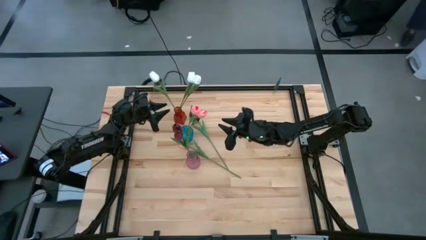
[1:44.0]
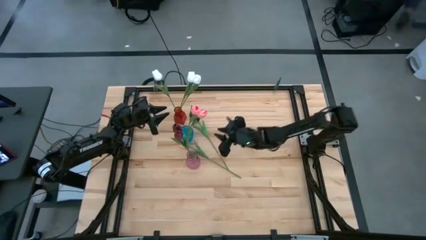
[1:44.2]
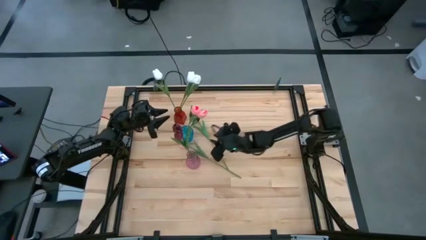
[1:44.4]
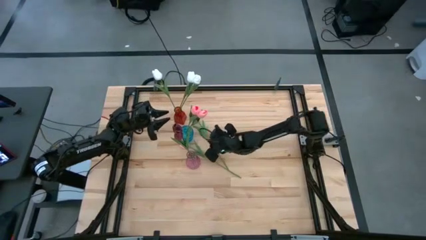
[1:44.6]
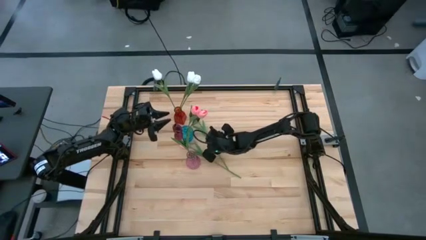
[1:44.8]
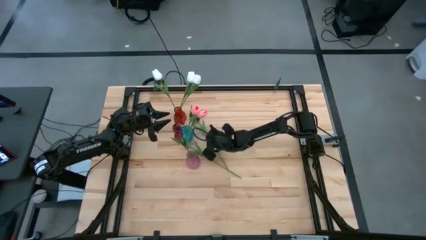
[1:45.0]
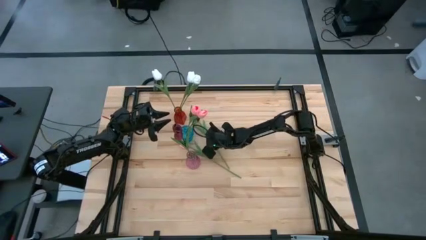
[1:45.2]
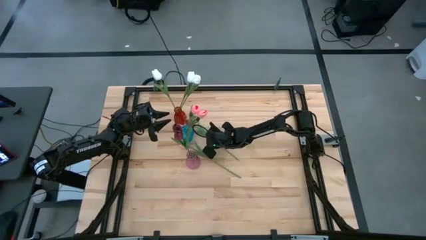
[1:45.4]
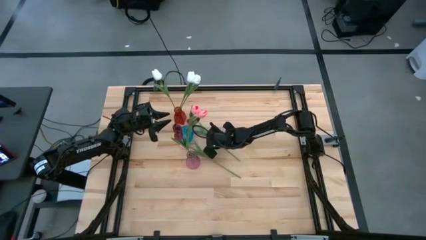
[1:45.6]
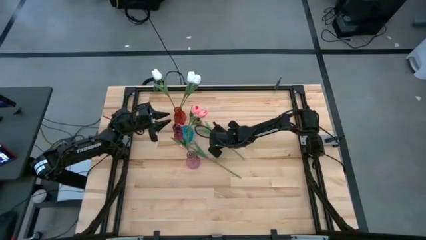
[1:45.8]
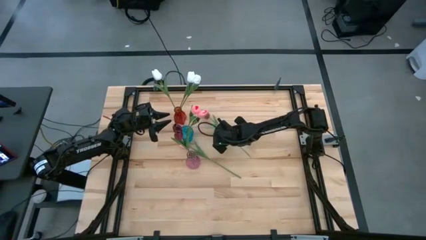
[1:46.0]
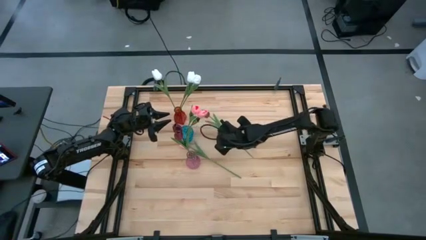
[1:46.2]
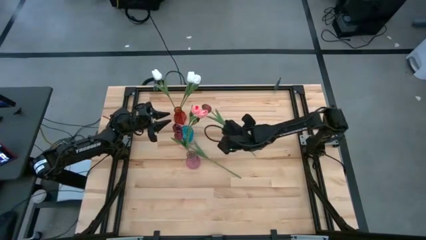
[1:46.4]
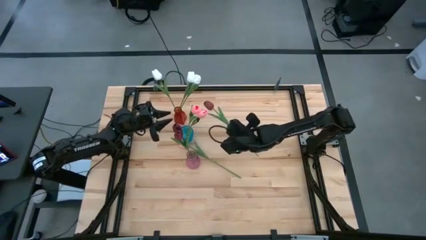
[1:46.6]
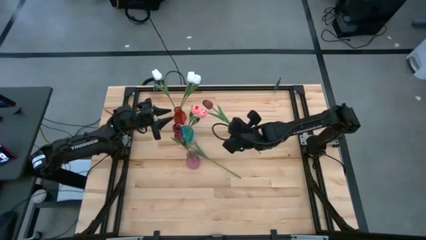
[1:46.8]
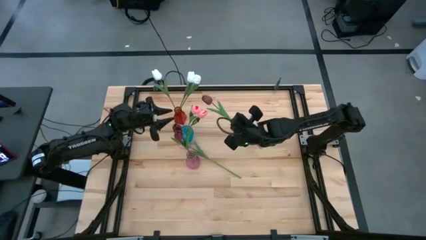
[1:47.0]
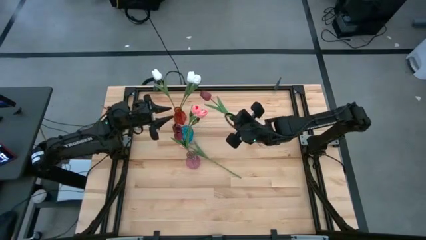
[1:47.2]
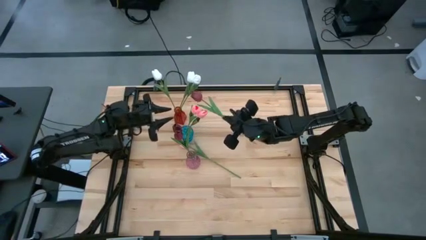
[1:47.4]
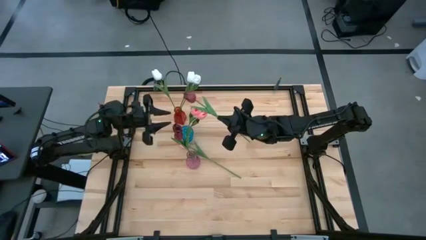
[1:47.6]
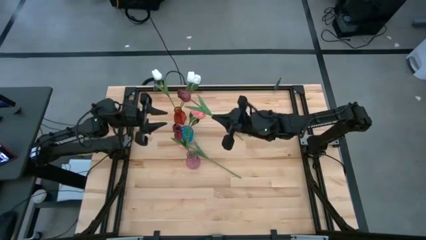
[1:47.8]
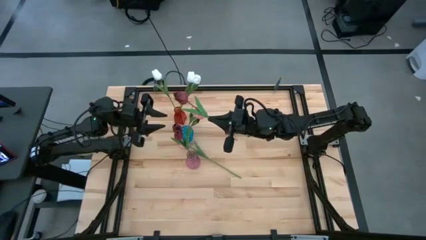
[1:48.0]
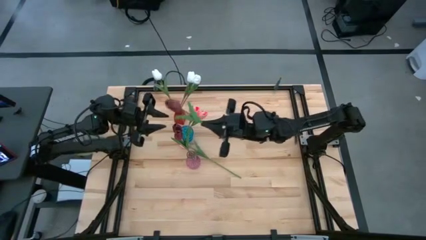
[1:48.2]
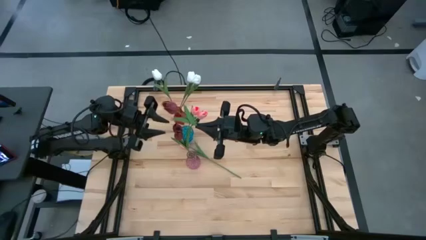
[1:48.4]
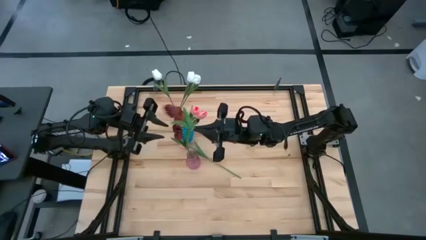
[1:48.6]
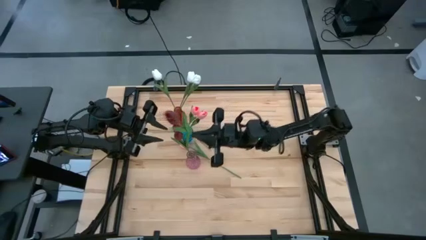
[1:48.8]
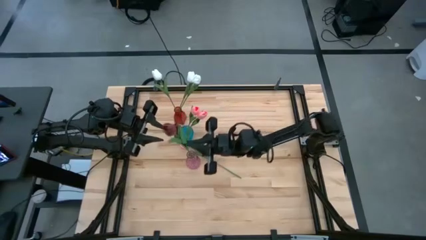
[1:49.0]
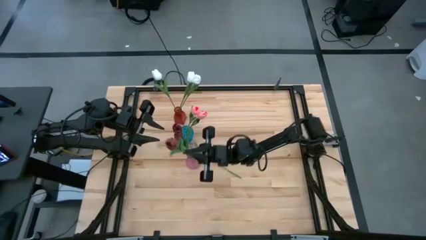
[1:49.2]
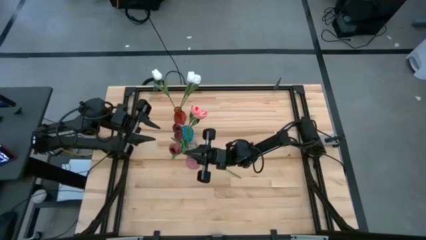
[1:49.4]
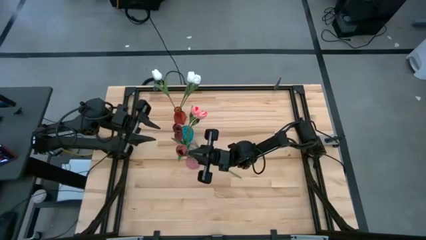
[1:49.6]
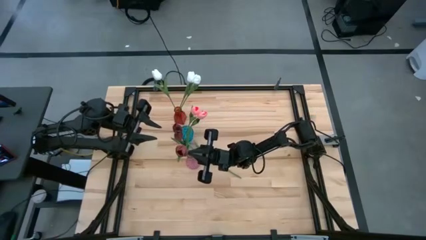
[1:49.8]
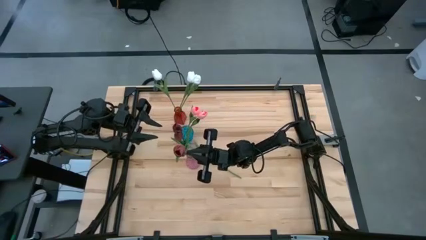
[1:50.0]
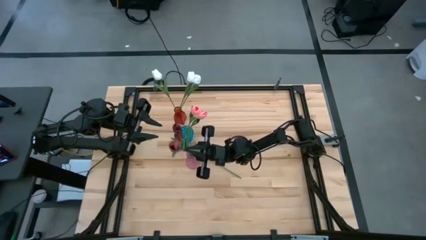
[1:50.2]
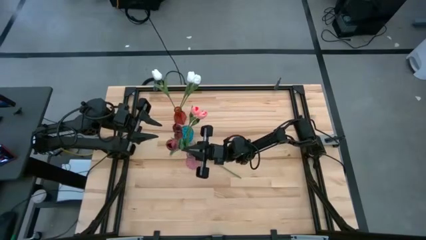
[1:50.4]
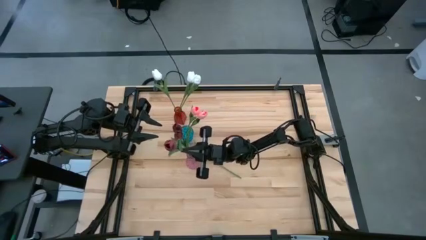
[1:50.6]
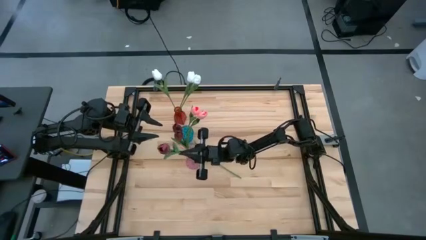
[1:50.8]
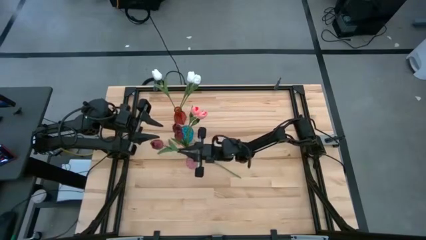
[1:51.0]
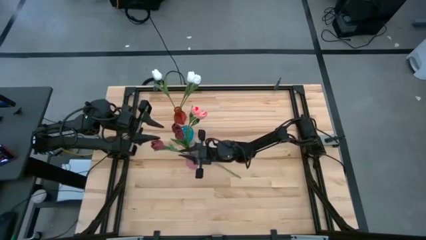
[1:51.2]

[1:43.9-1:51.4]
Task: Sort flowers into vase by color
Put the red flower into the purple vase

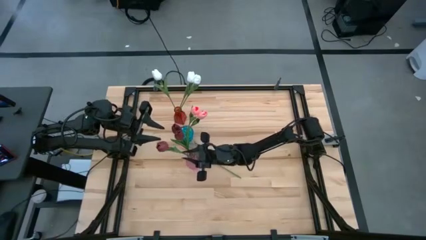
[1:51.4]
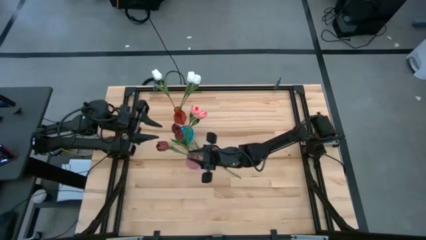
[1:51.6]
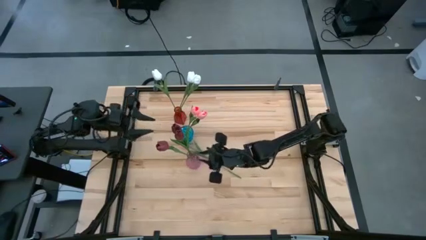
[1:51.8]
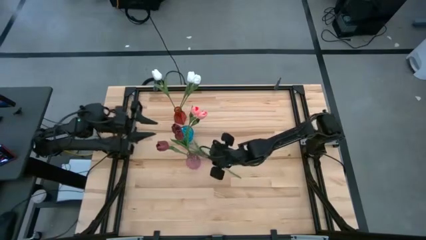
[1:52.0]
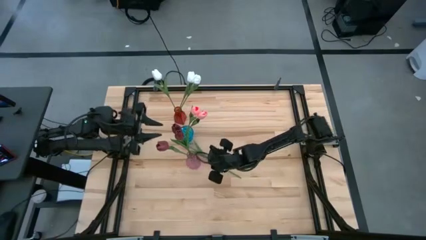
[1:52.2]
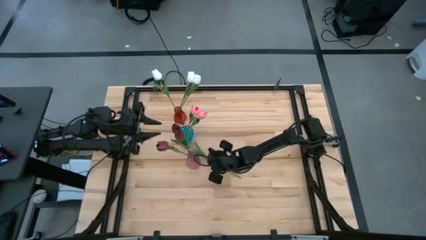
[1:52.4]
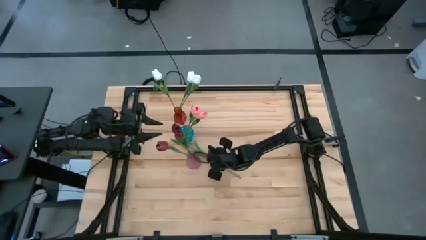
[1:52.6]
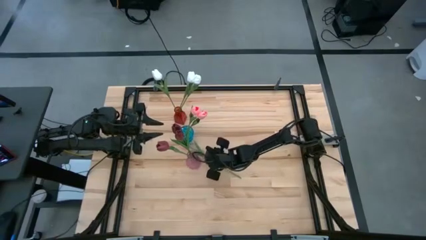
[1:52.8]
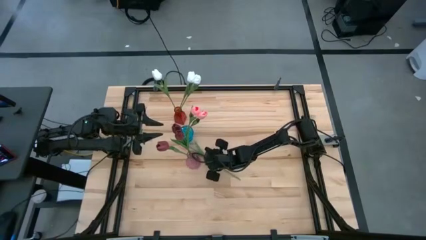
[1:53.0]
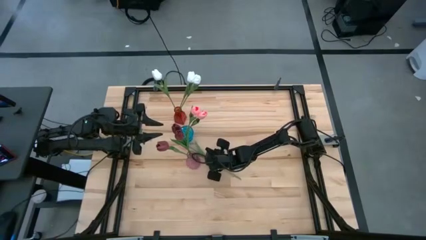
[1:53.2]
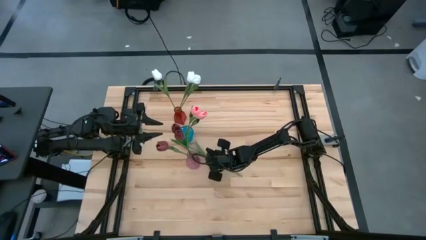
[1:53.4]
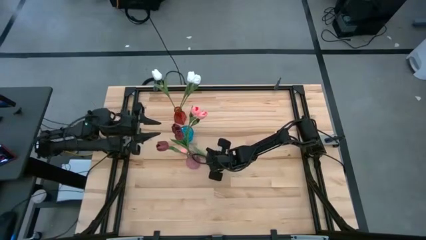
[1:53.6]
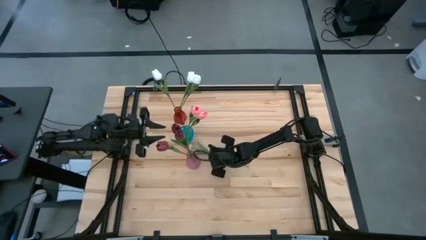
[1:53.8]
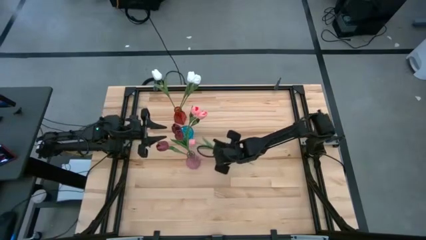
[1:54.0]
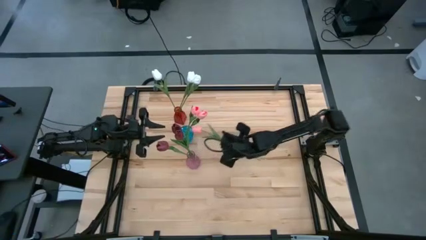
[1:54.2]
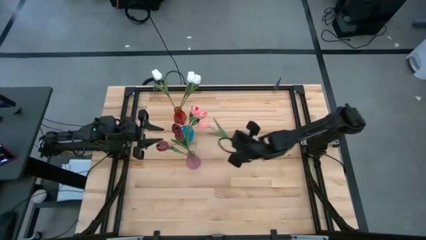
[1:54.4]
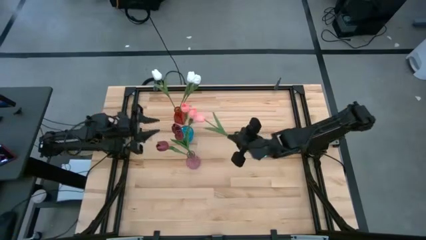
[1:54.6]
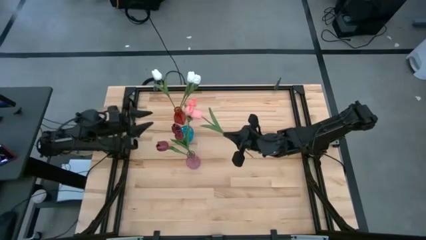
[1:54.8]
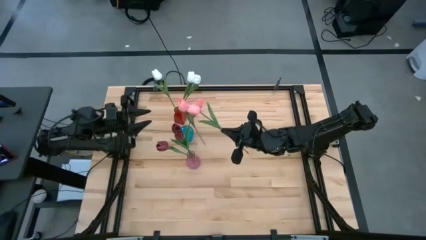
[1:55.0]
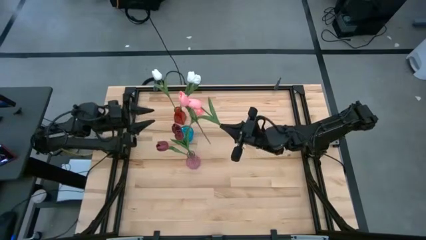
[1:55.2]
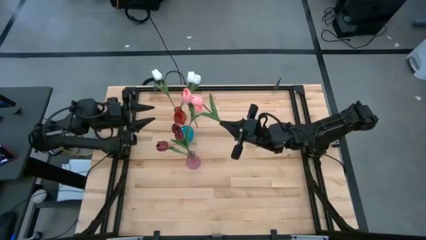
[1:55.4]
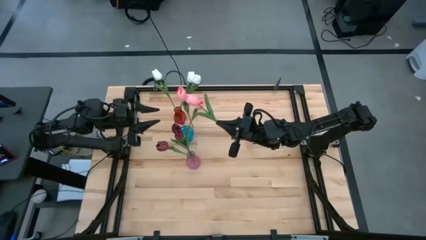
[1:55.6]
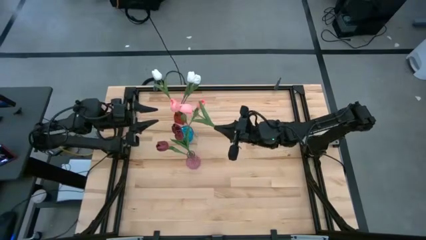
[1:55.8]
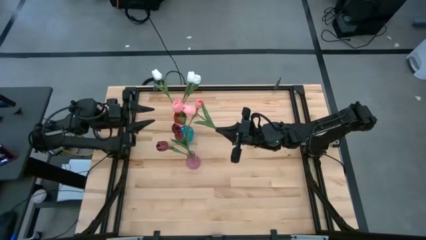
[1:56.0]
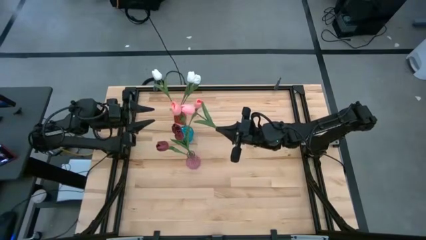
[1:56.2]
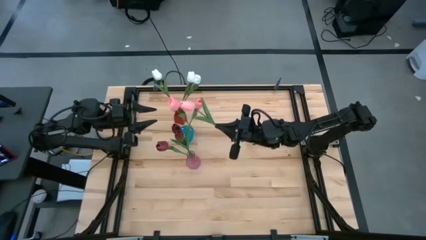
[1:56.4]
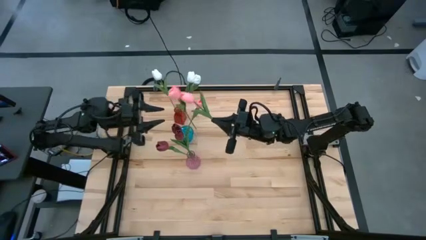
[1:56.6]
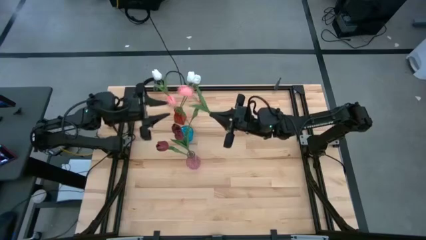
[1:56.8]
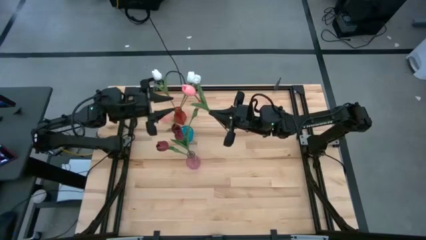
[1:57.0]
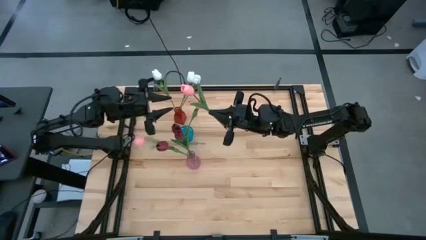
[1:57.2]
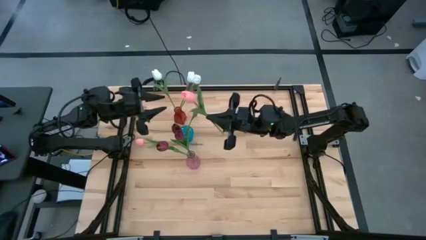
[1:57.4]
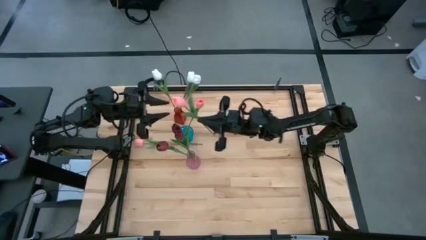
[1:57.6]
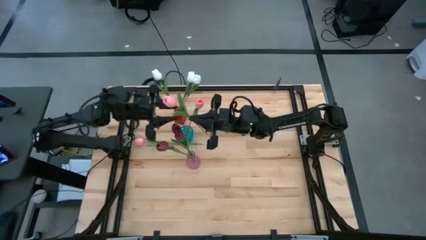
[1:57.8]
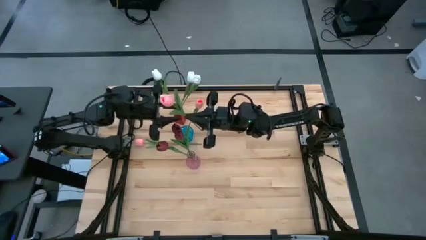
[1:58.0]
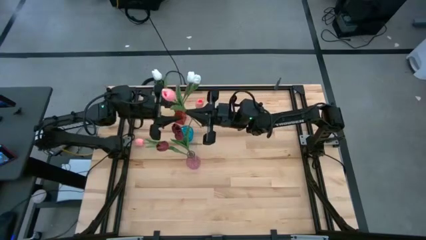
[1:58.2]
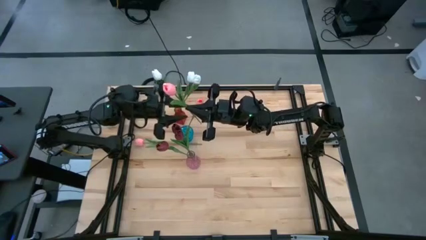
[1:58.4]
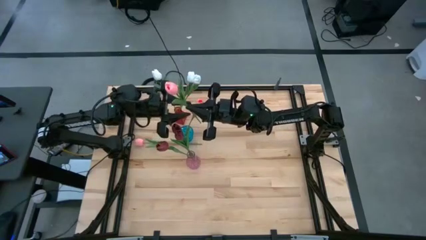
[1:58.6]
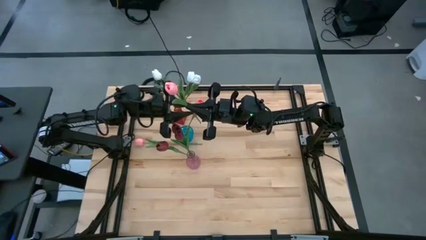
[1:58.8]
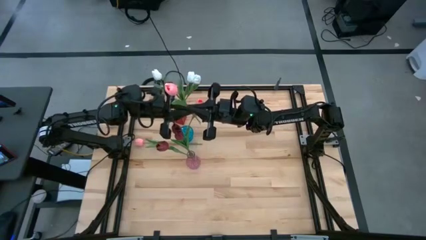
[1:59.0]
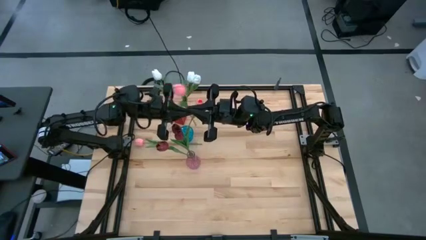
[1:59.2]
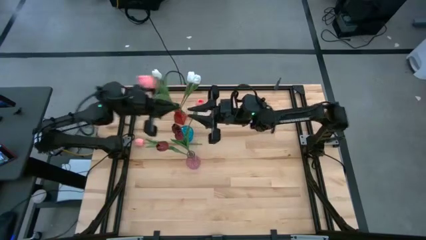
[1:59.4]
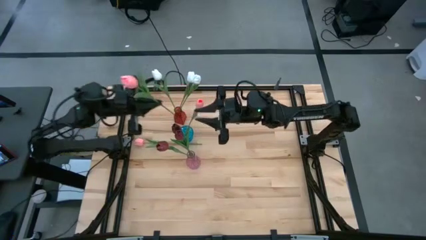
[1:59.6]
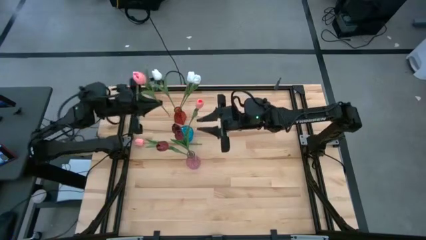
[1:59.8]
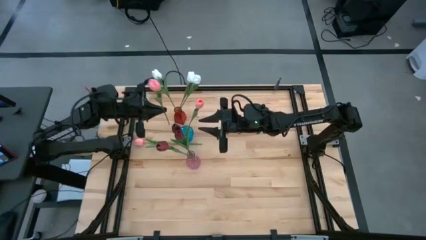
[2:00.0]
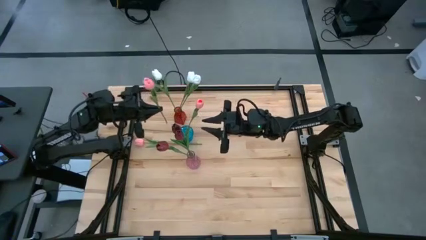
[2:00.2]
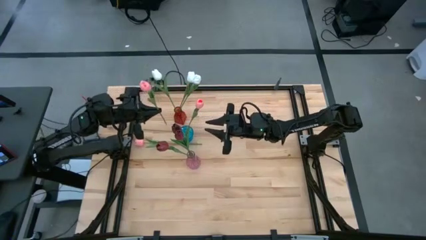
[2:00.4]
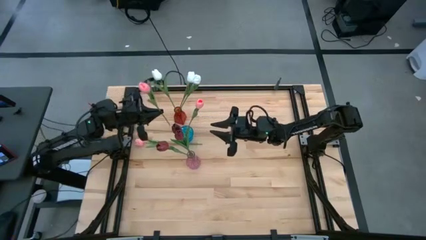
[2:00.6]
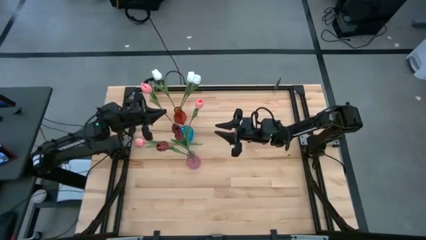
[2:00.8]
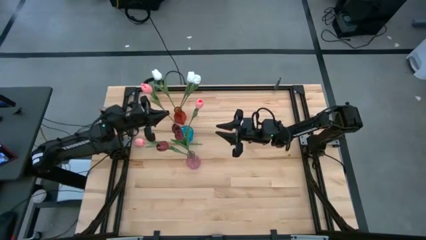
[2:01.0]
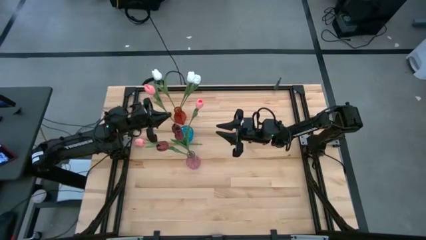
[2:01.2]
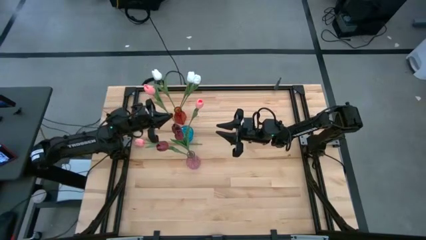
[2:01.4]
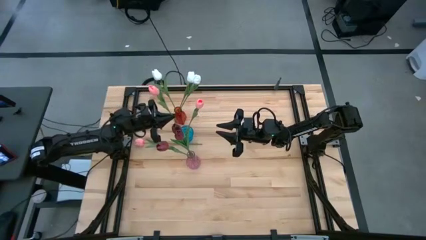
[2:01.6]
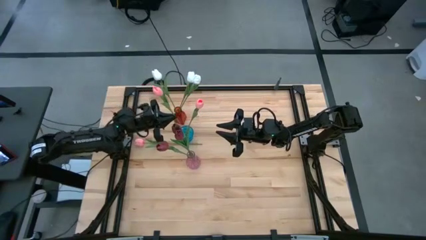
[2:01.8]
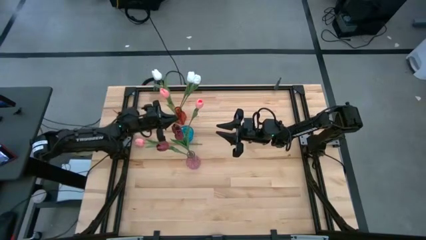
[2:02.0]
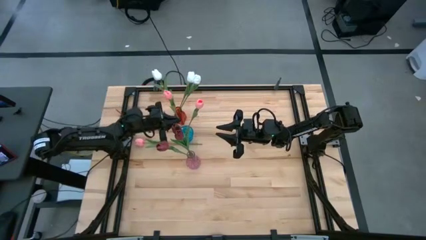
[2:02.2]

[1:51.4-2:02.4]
Put the pink flower into the blue vase
